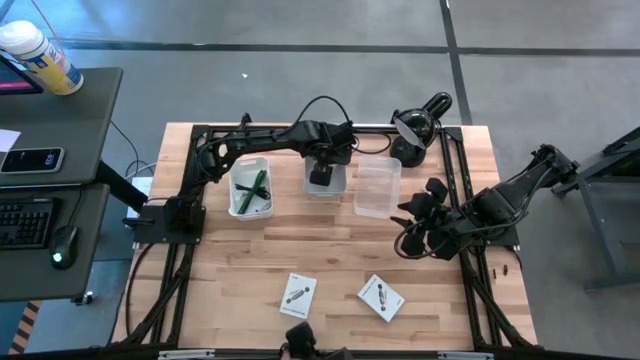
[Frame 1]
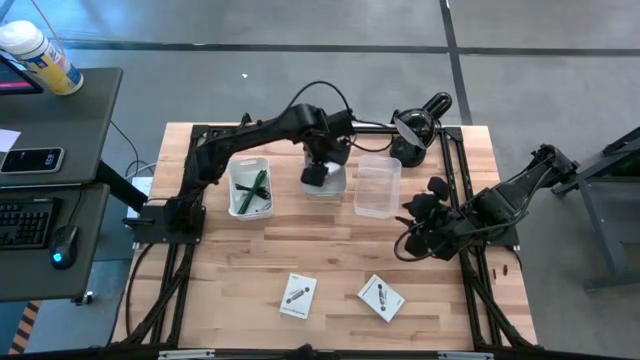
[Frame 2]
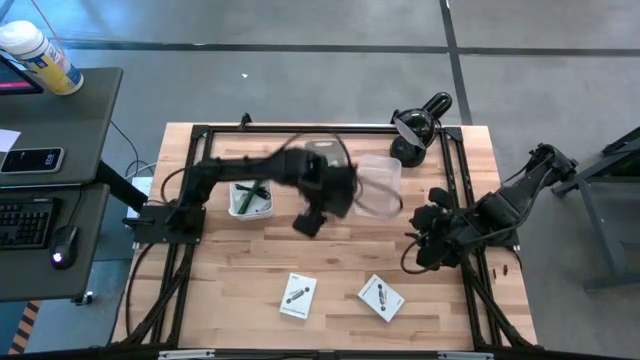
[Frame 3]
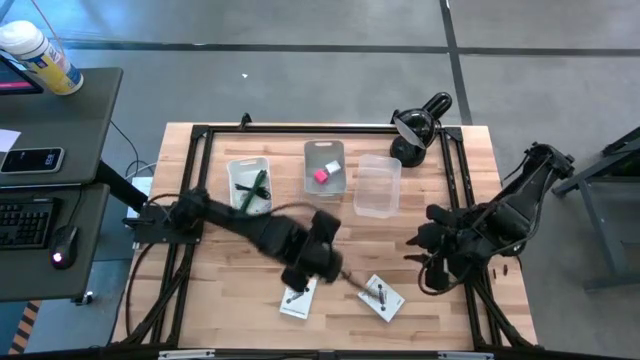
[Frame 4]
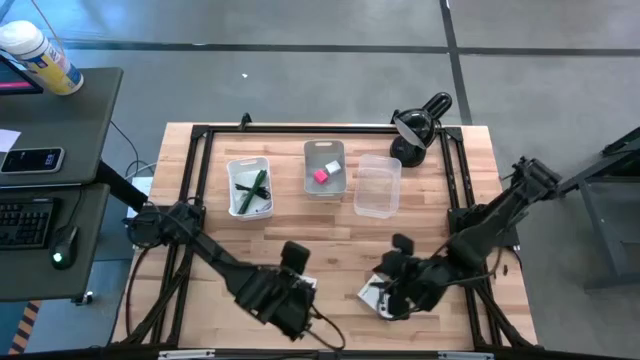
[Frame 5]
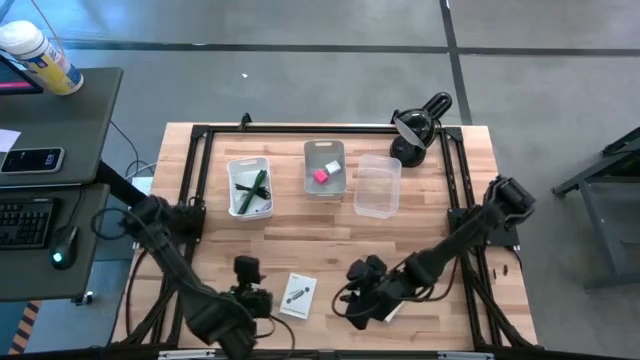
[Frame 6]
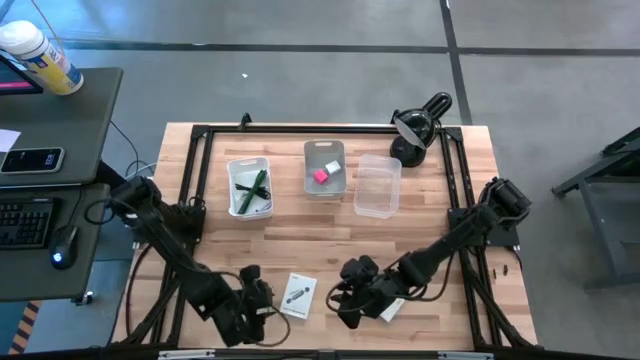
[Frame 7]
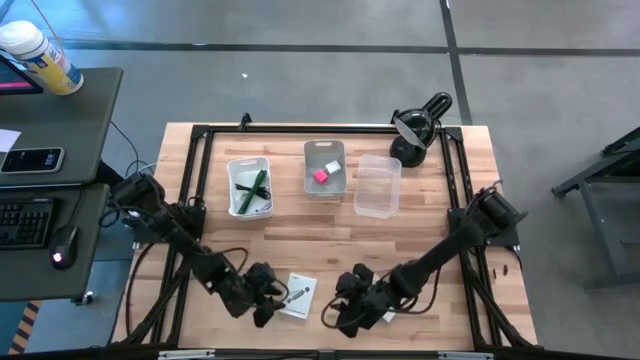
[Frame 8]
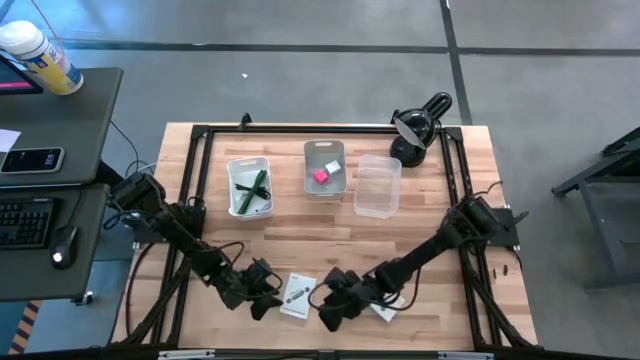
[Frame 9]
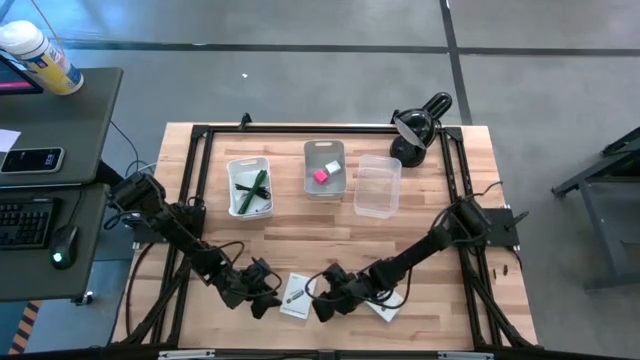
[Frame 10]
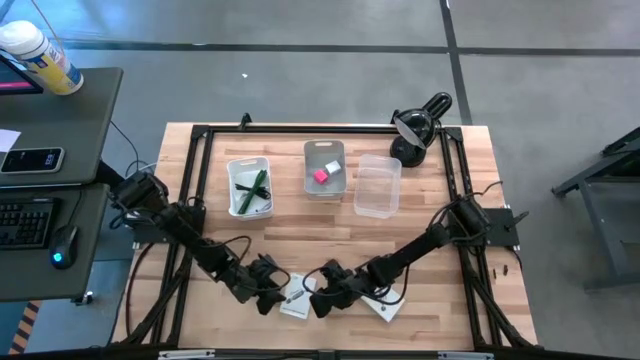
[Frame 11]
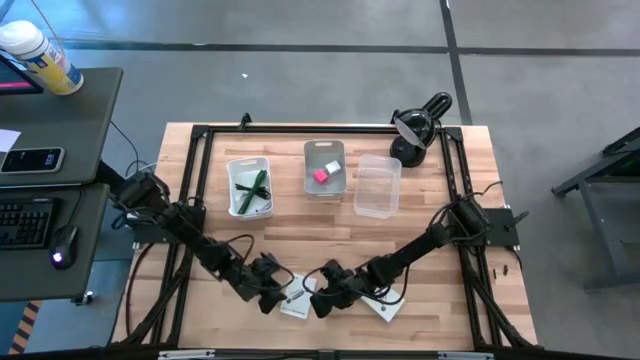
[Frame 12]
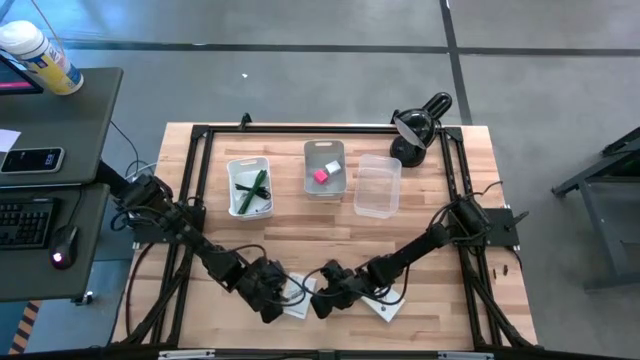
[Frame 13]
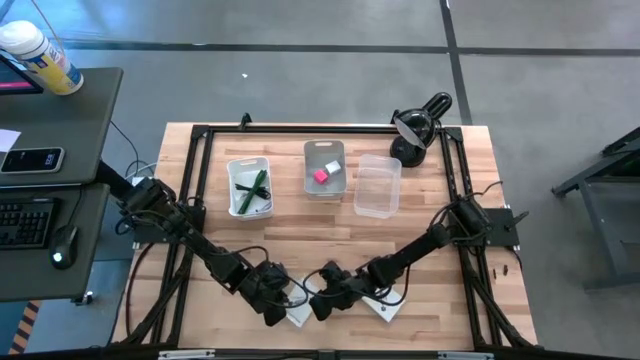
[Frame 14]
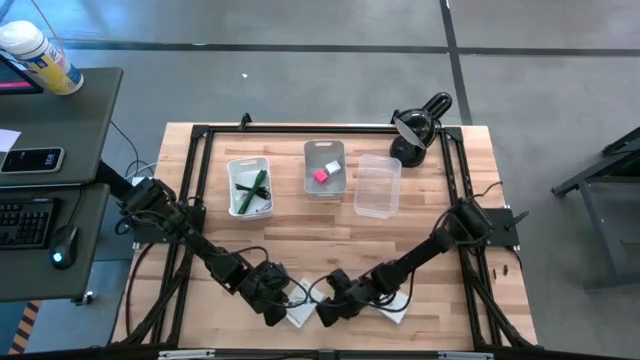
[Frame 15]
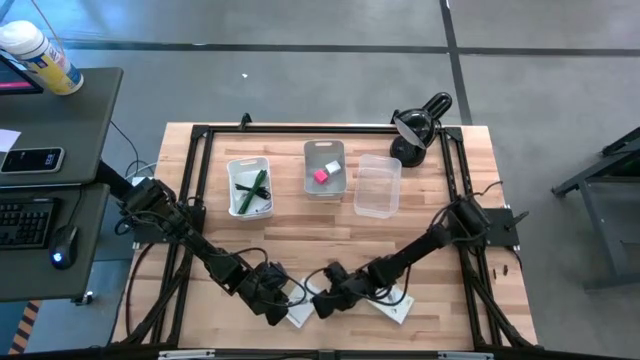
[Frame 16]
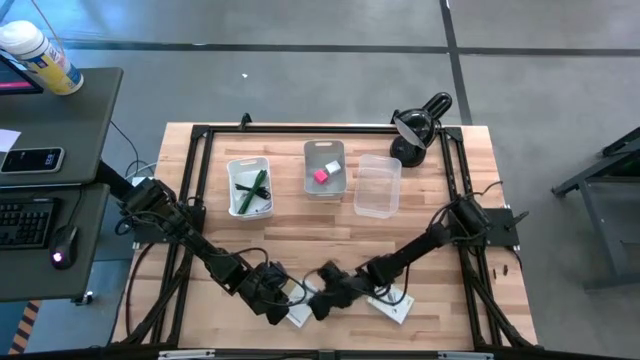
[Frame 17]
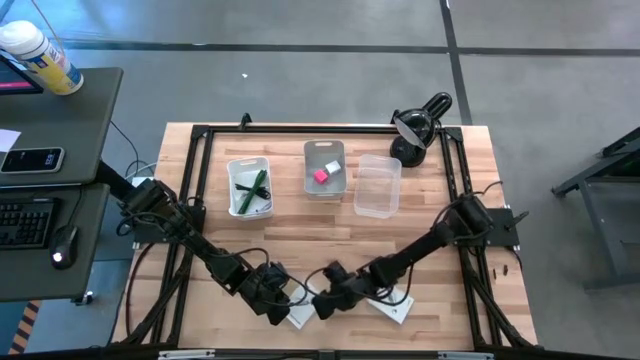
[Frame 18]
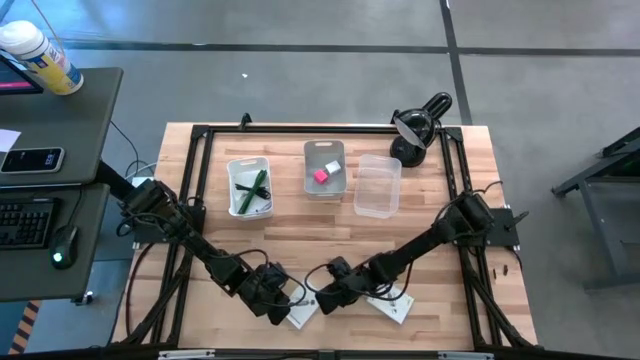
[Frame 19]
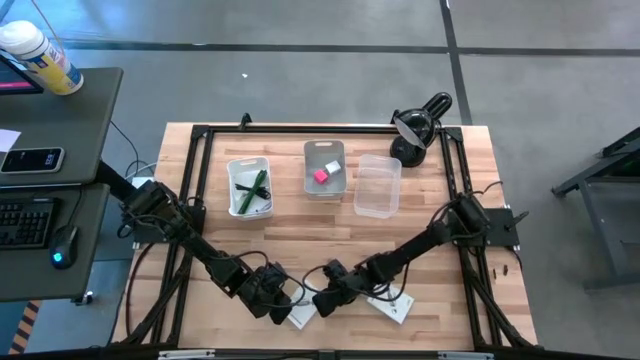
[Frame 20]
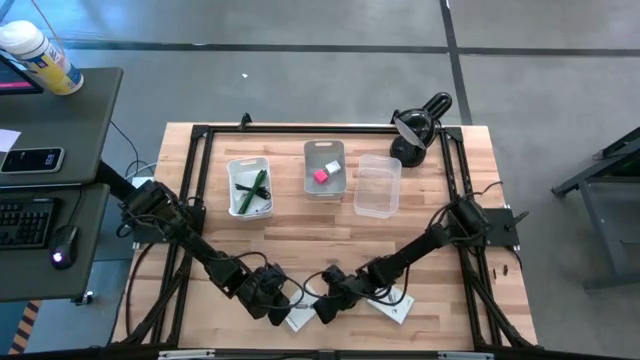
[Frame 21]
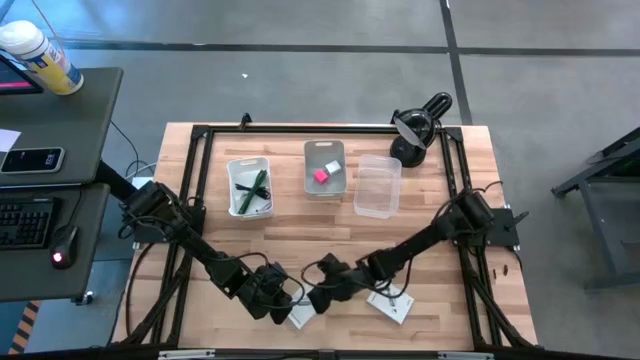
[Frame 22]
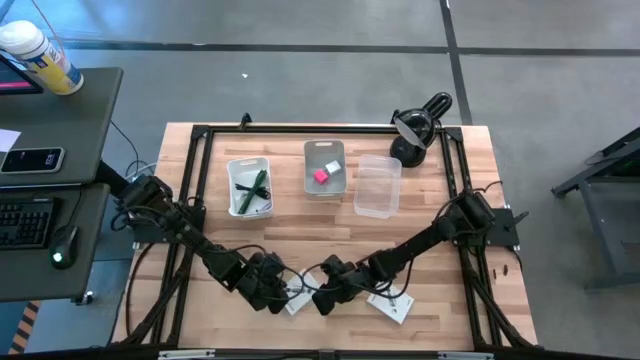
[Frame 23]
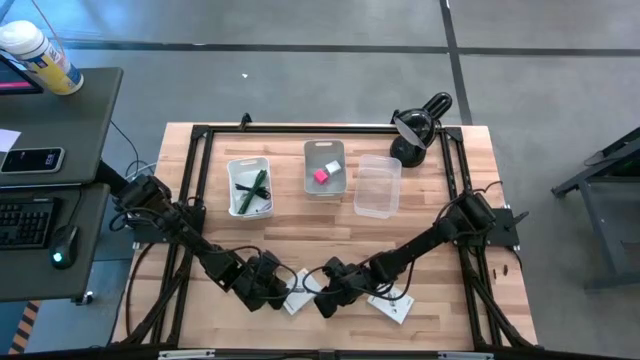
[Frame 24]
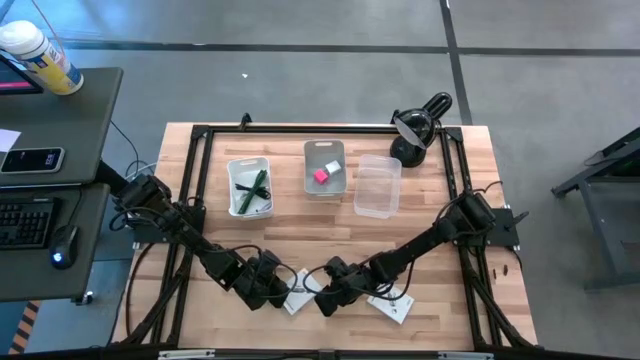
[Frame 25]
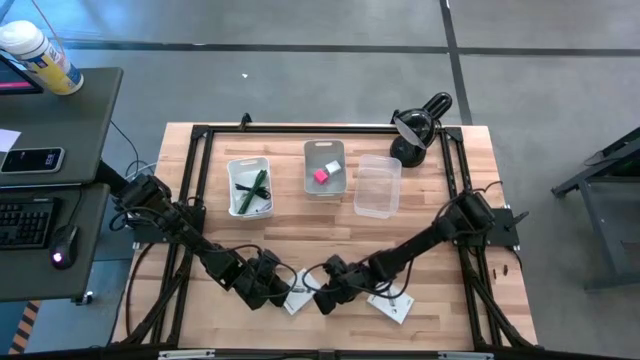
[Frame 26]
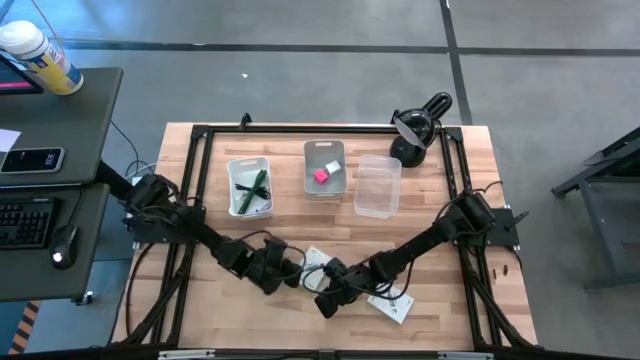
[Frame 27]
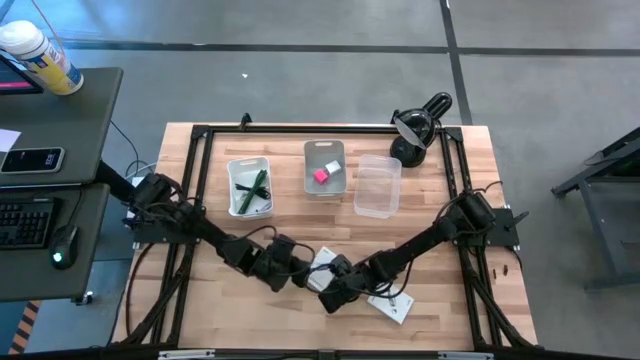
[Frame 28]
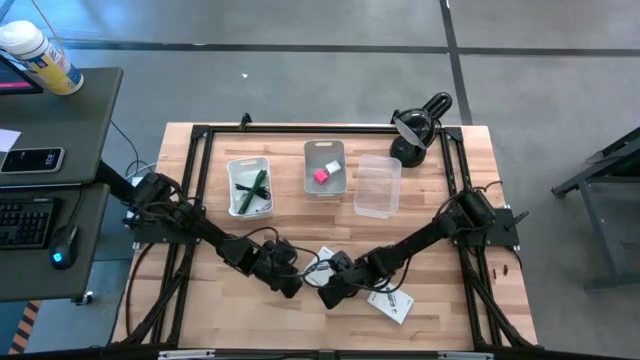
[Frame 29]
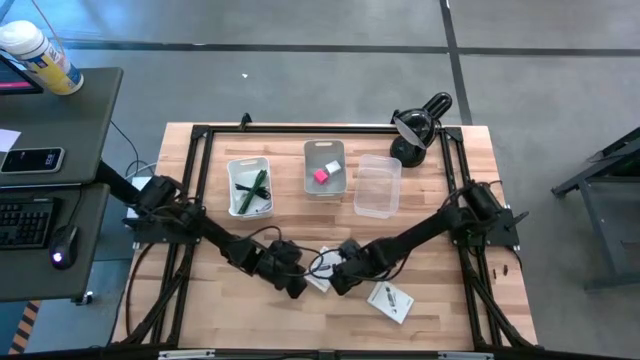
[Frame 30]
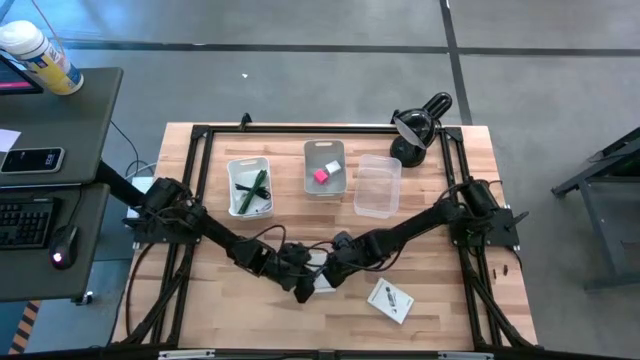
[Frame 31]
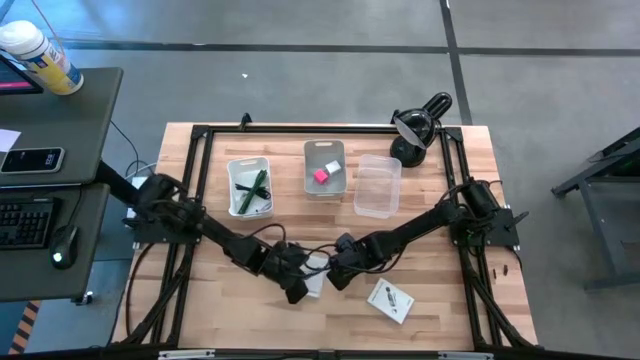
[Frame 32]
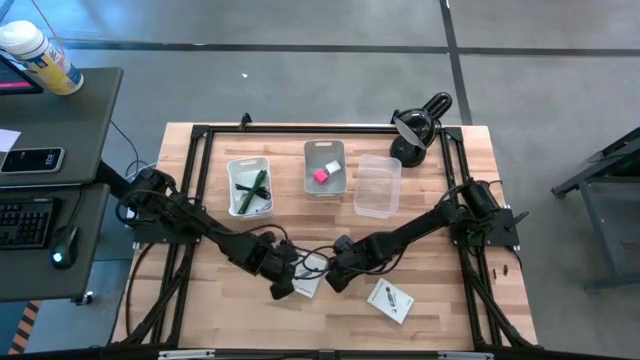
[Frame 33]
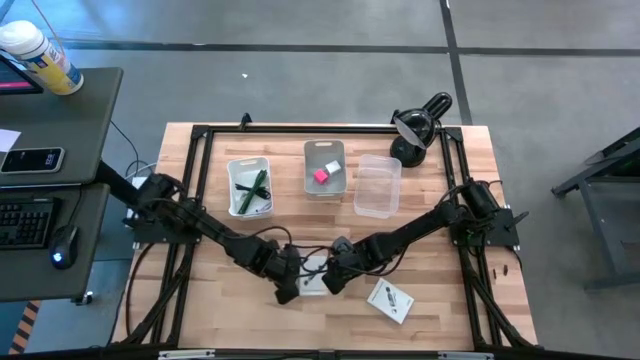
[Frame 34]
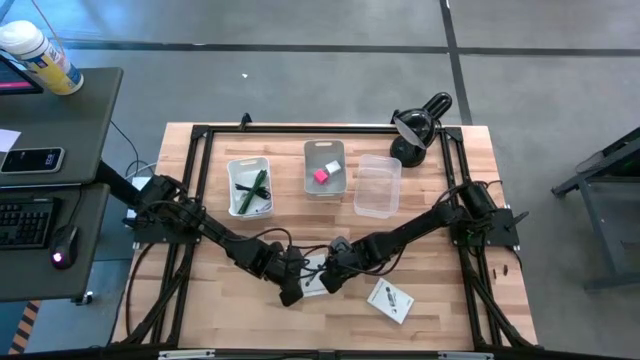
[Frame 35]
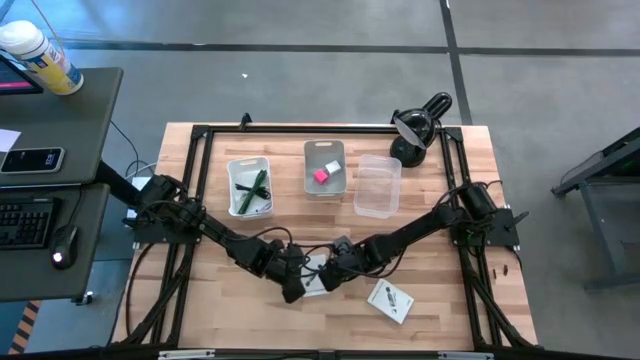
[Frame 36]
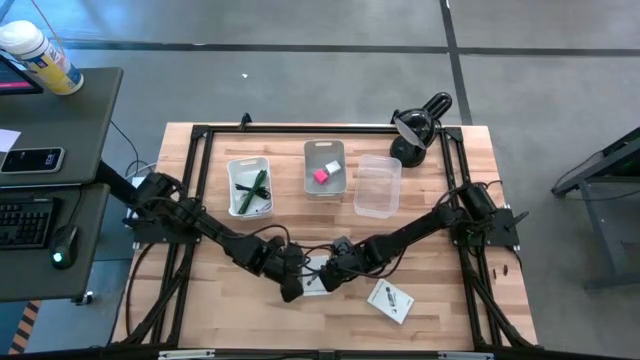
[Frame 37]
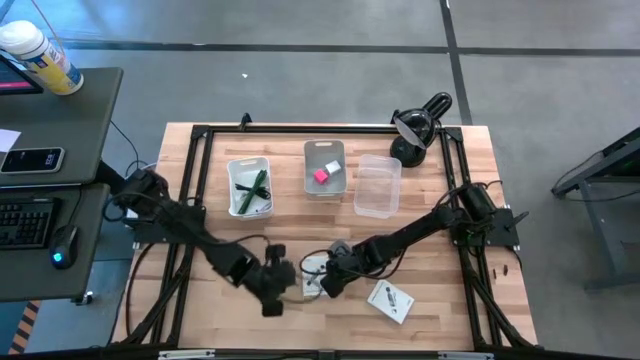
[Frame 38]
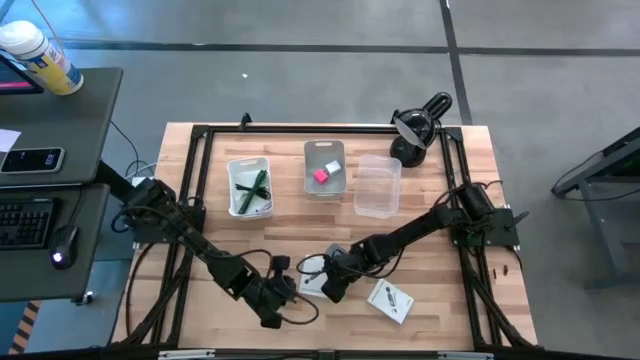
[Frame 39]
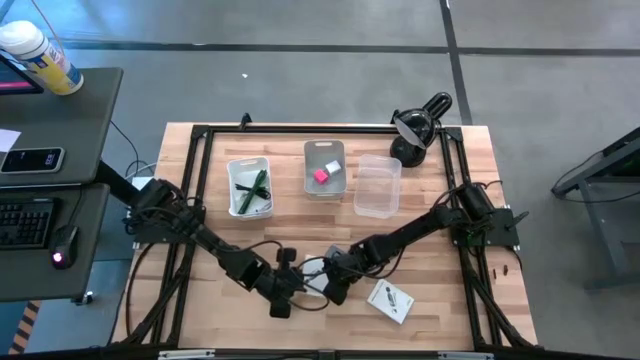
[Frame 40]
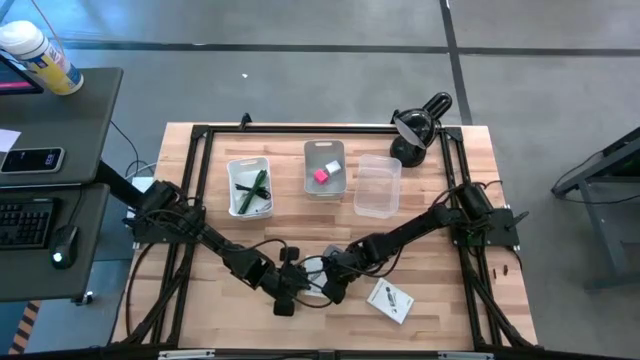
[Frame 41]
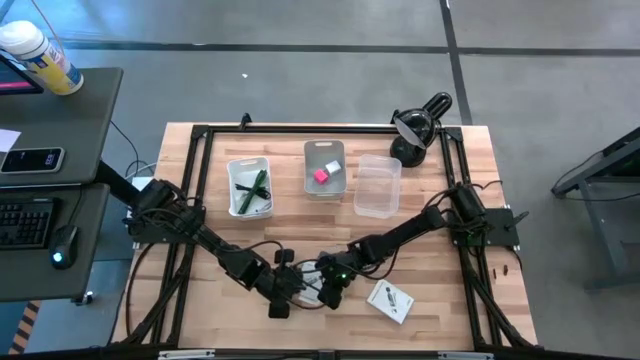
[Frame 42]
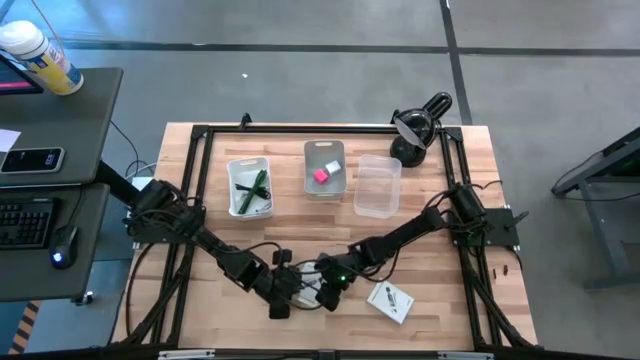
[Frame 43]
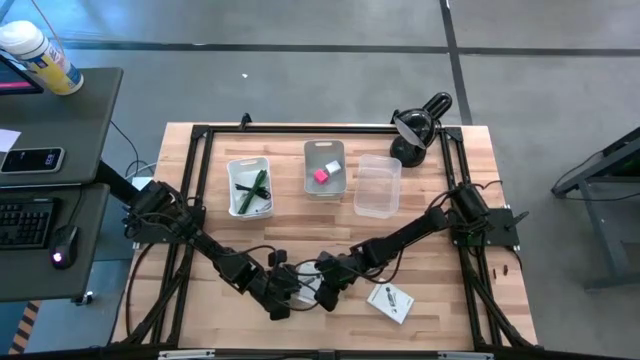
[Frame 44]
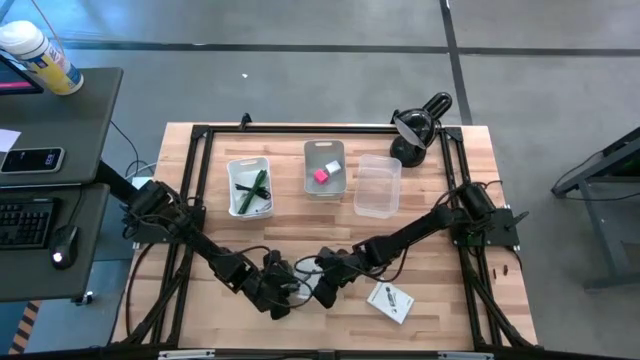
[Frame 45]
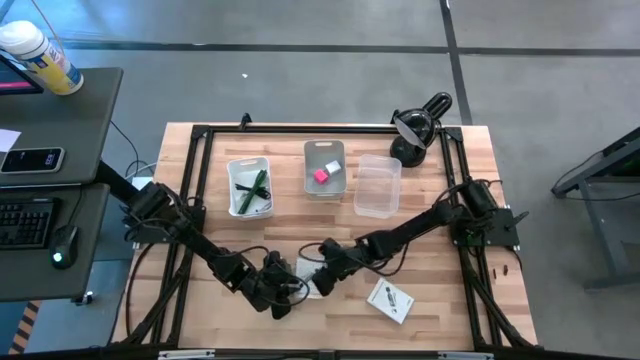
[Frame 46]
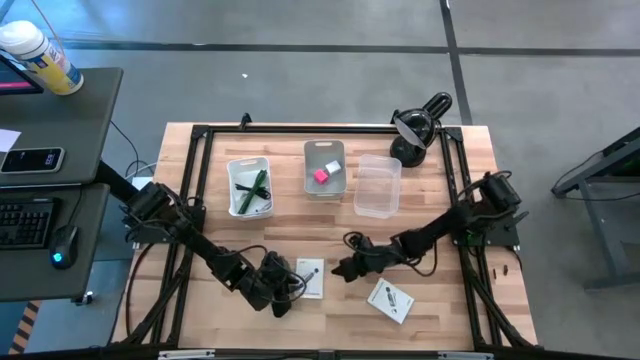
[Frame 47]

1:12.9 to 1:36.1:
Task: Pick and place items into bin
Put the left card reader box into the transparent bin
